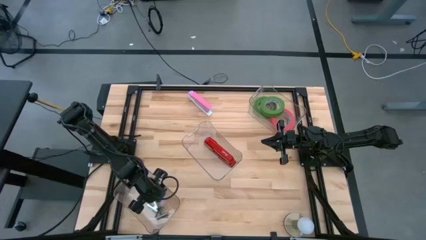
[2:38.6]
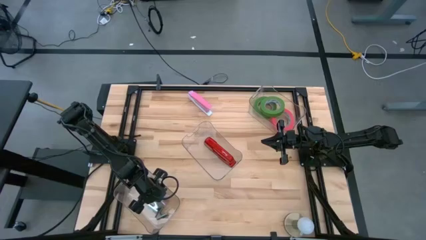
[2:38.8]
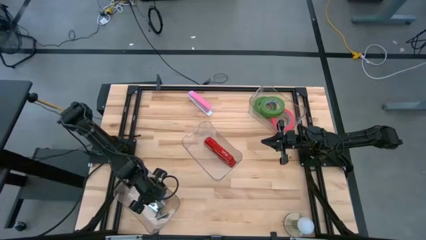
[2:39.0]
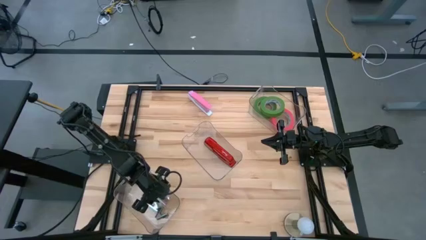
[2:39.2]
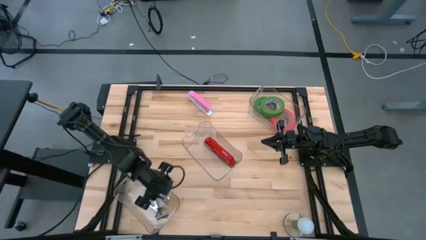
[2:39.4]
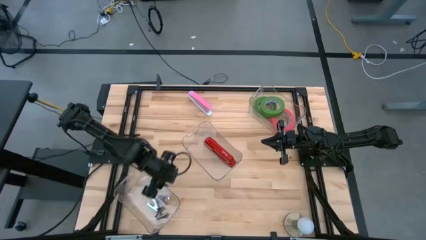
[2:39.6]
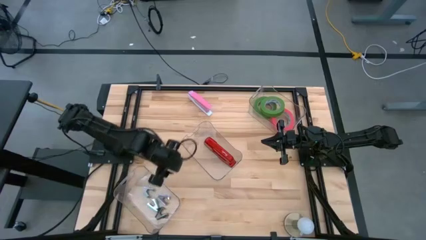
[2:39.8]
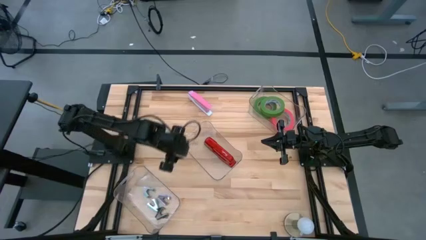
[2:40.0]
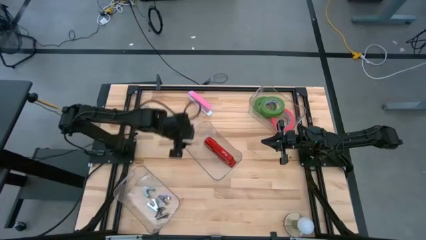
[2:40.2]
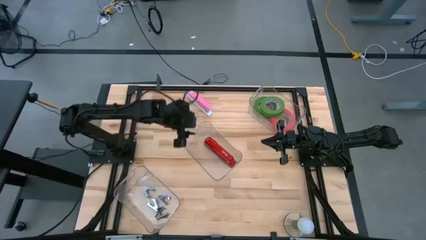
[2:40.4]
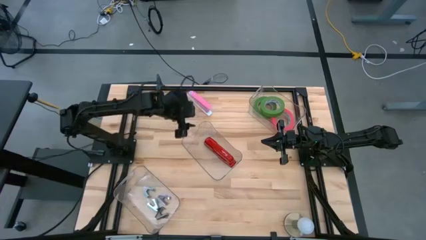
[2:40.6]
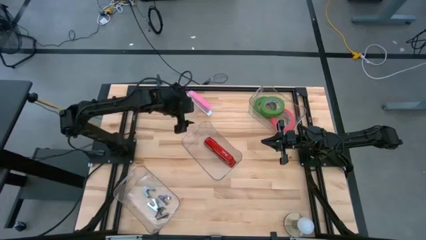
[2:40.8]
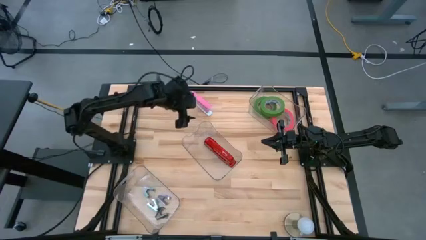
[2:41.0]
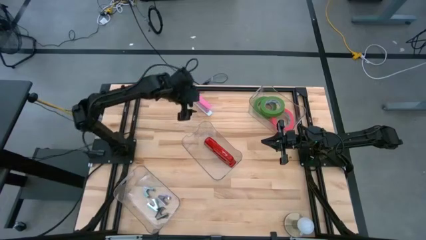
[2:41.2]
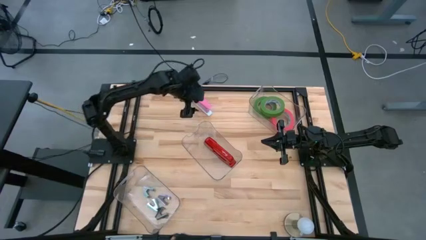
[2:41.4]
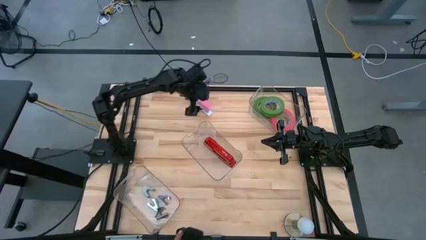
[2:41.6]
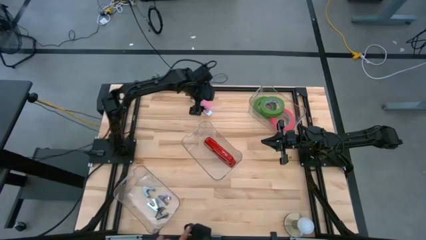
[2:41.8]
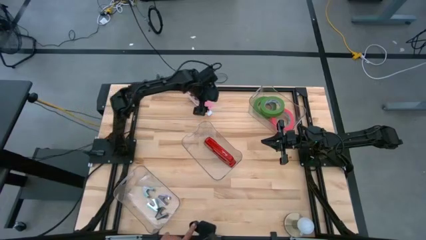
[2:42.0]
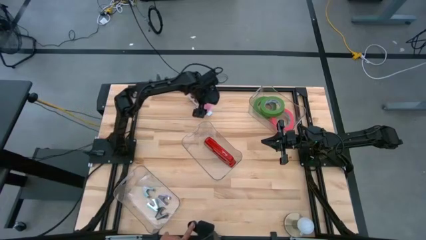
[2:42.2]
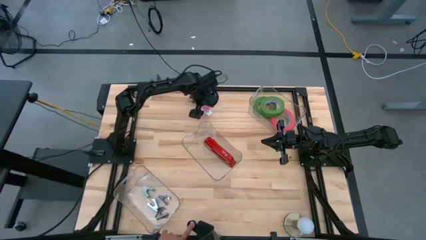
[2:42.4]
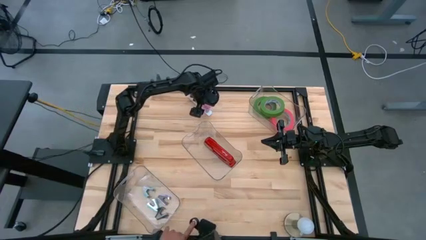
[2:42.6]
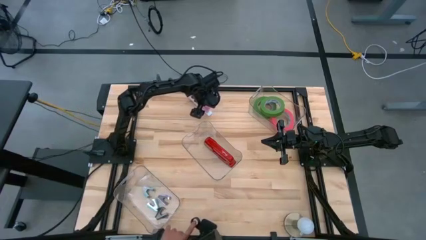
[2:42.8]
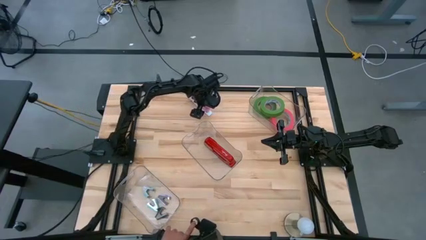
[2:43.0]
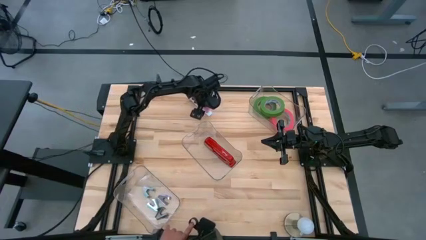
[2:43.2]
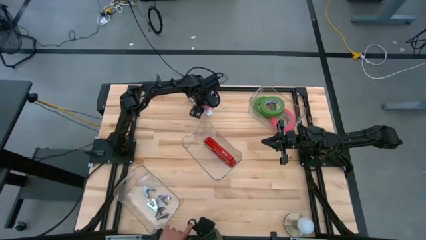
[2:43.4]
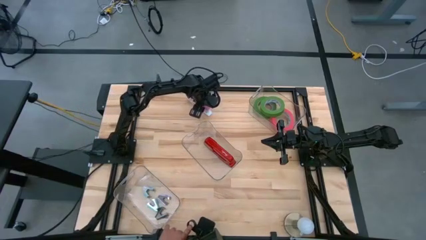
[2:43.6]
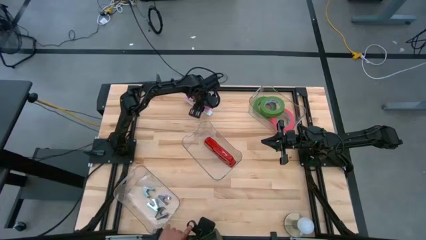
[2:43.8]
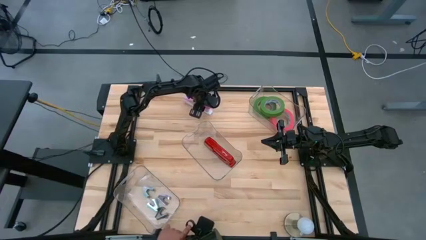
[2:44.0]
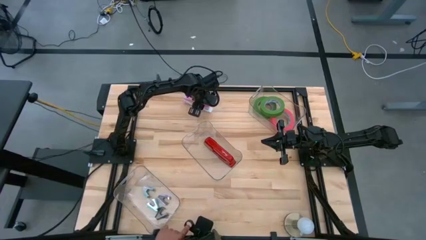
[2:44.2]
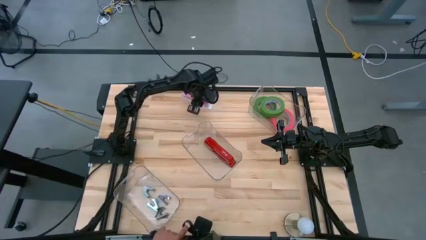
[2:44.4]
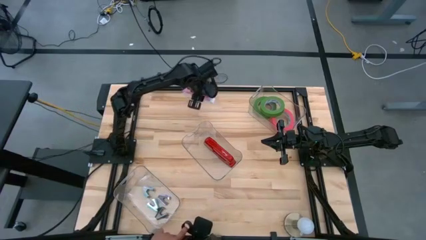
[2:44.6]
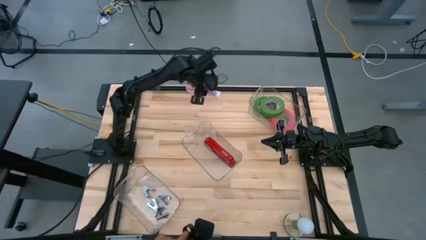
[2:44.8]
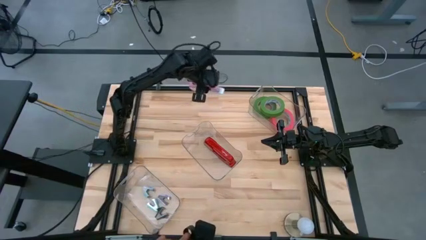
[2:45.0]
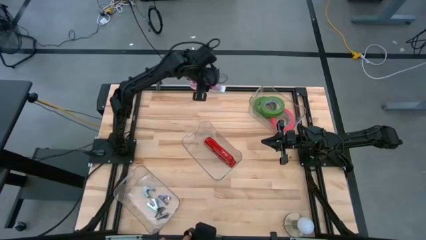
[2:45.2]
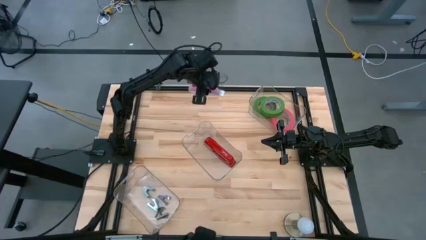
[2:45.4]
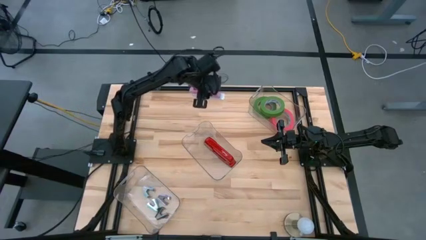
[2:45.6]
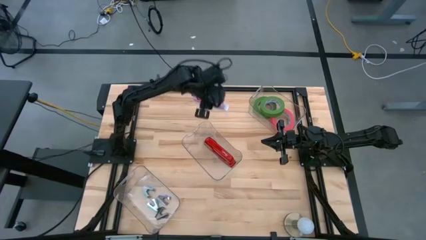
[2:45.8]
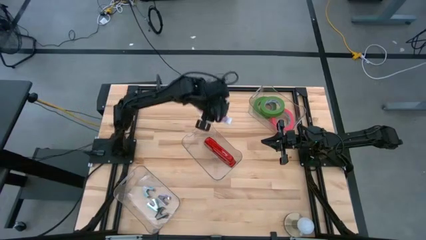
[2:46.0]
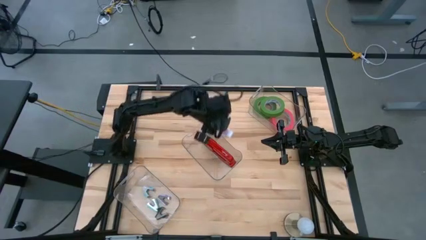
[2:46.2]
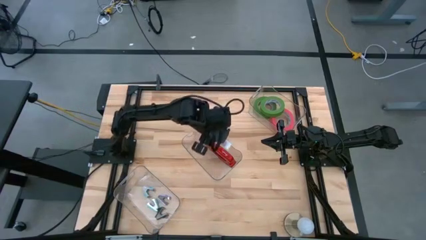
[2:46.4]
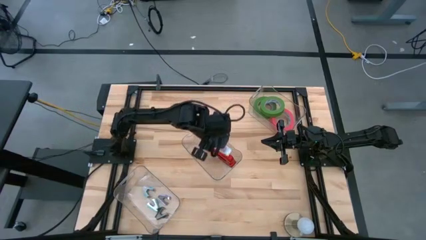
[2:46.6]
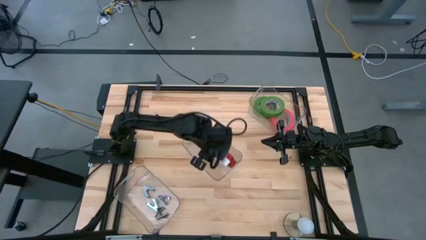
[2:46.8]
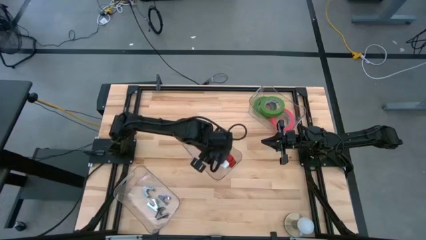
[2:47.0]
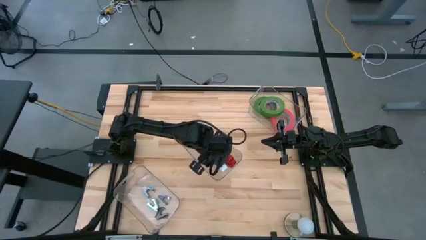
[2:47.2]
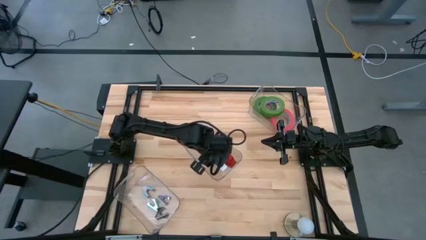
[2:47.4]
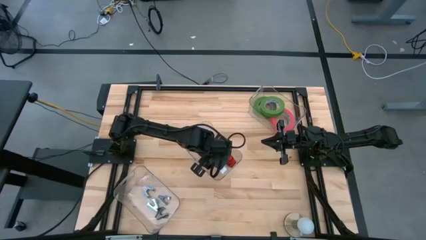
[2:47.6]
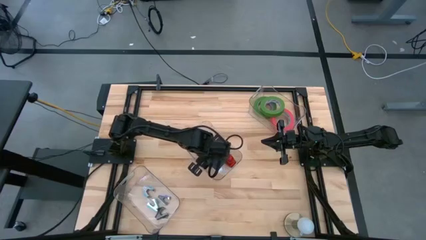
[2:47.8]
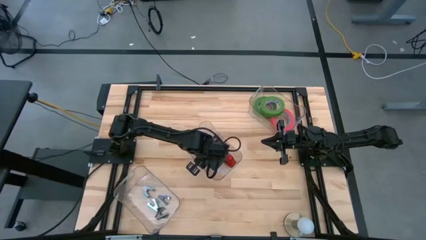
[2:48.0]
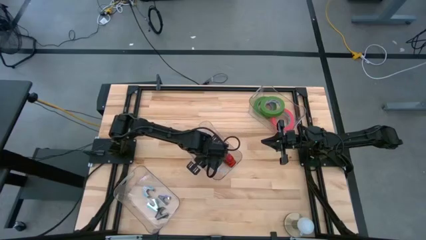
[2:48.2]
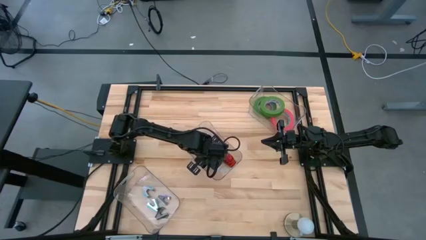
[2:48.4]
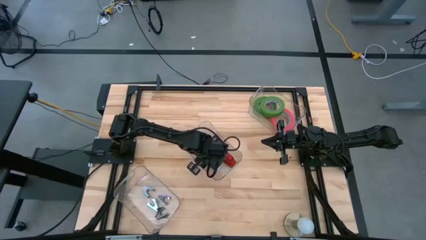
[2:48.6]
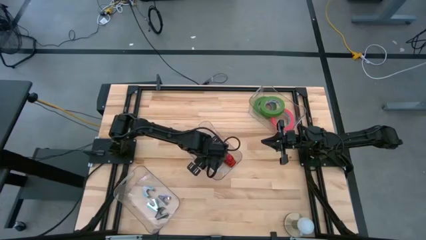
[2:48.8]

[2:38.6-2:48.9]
Task: Pick and place Stapler, Stapler remover, tape
Put the pink stapler into the middle transparent bin

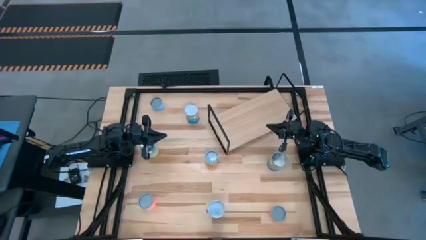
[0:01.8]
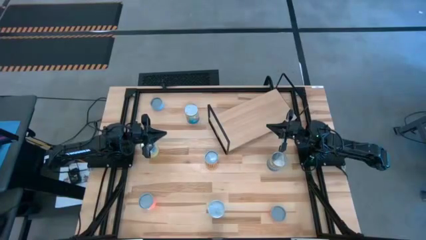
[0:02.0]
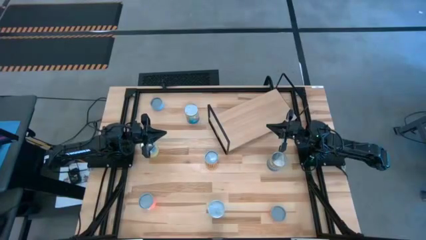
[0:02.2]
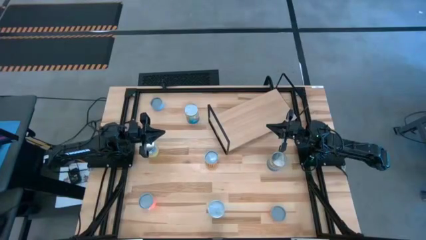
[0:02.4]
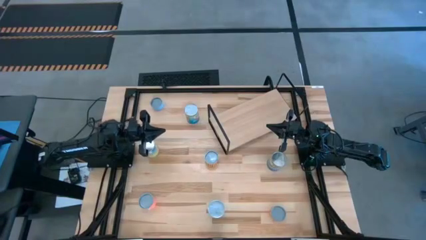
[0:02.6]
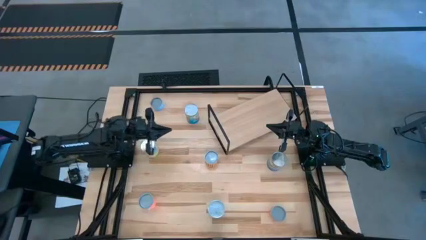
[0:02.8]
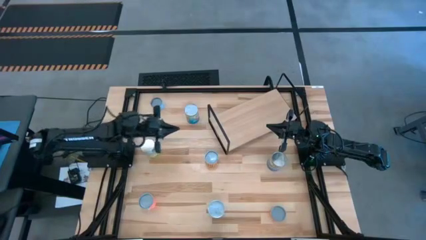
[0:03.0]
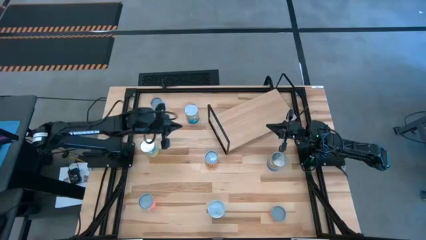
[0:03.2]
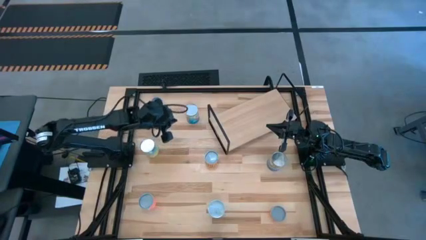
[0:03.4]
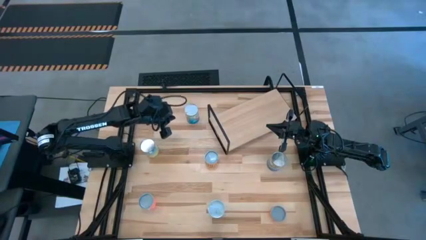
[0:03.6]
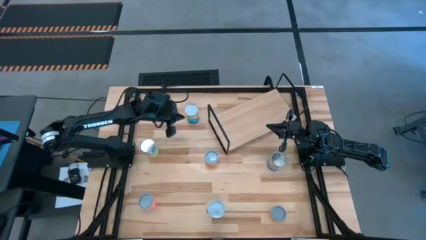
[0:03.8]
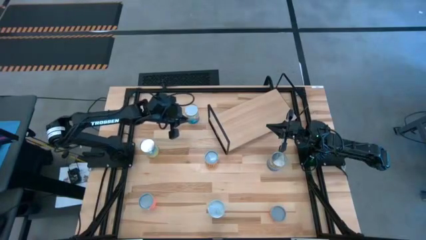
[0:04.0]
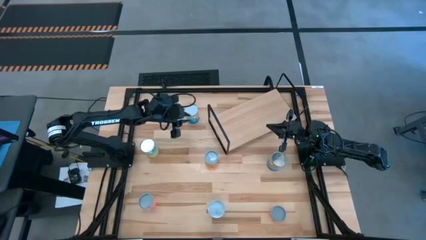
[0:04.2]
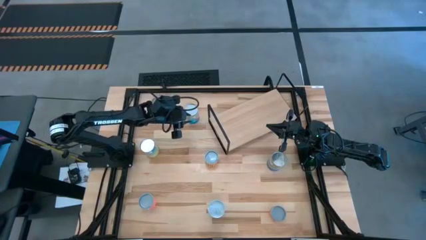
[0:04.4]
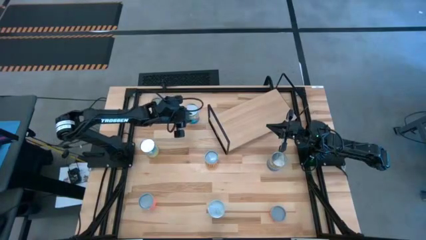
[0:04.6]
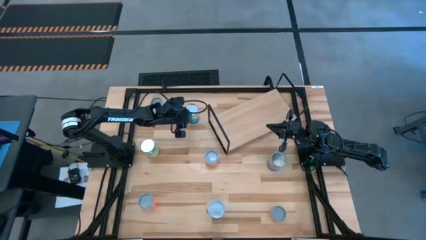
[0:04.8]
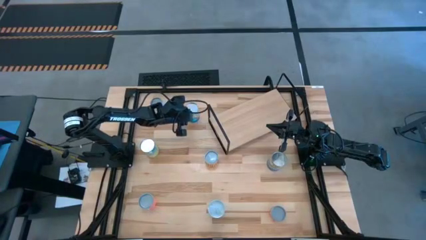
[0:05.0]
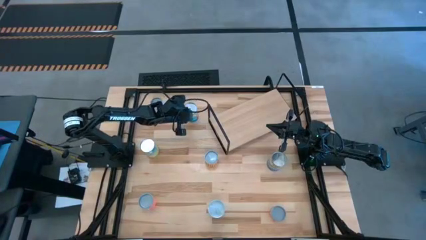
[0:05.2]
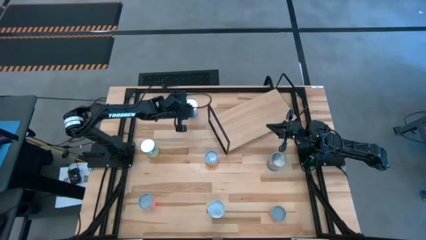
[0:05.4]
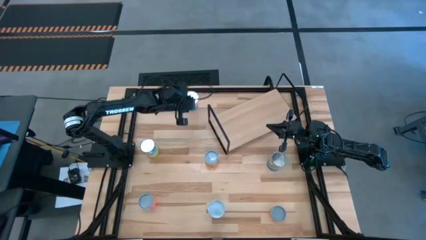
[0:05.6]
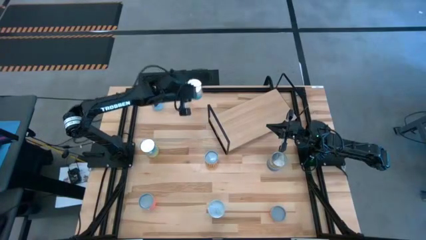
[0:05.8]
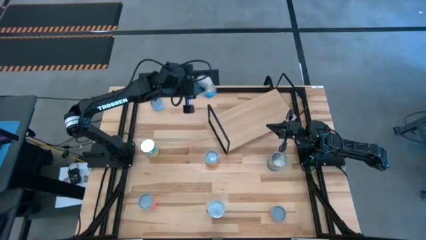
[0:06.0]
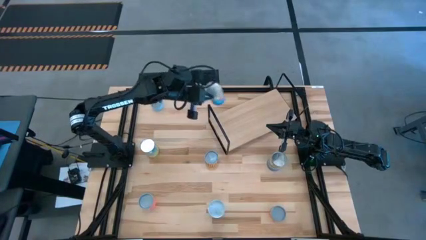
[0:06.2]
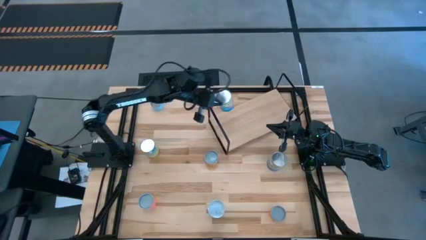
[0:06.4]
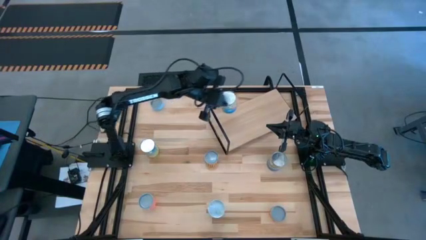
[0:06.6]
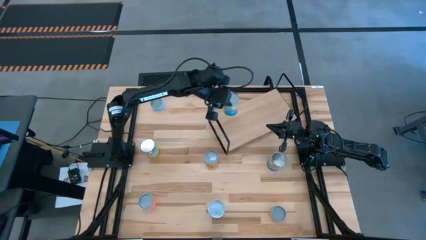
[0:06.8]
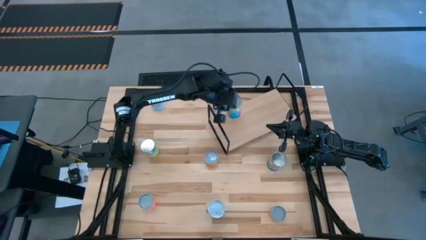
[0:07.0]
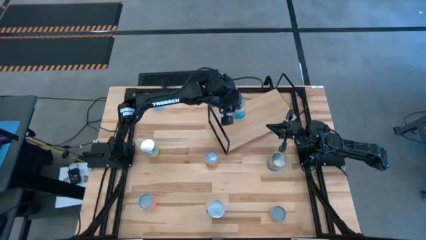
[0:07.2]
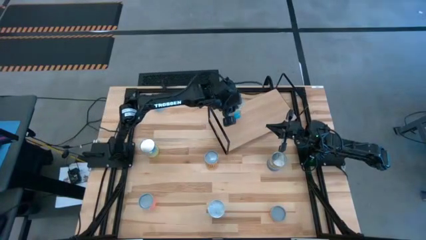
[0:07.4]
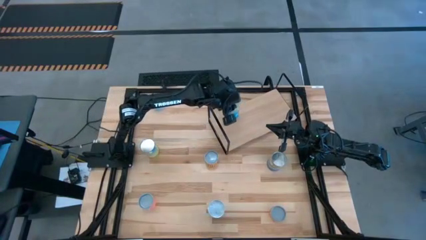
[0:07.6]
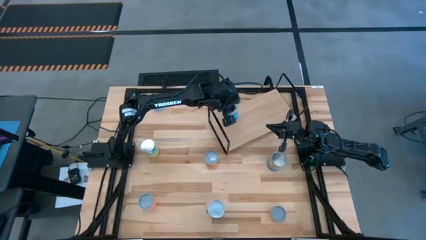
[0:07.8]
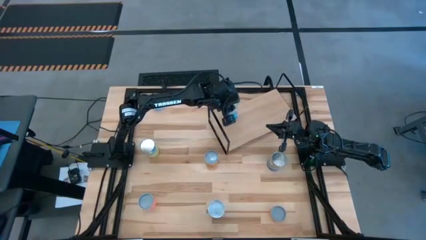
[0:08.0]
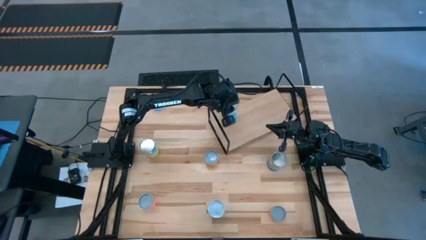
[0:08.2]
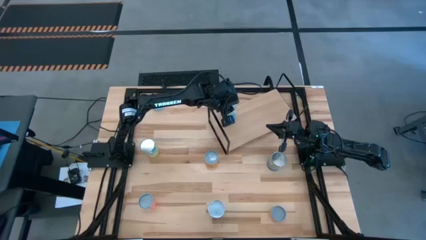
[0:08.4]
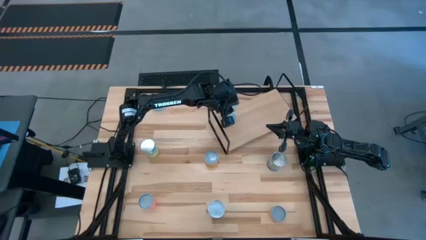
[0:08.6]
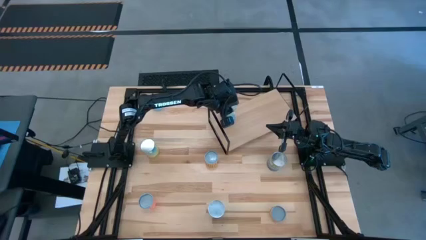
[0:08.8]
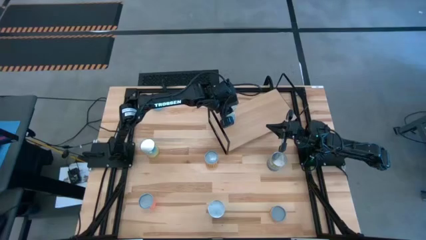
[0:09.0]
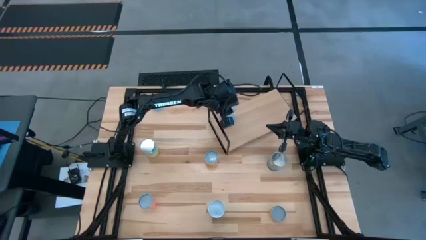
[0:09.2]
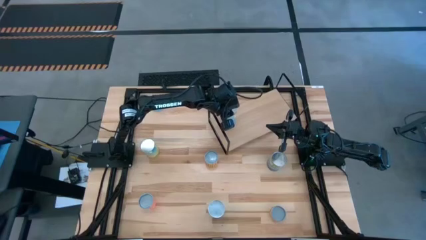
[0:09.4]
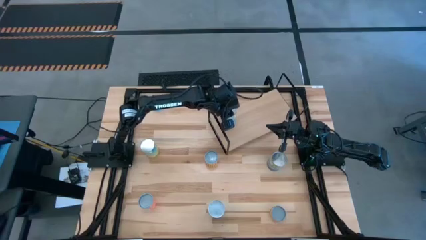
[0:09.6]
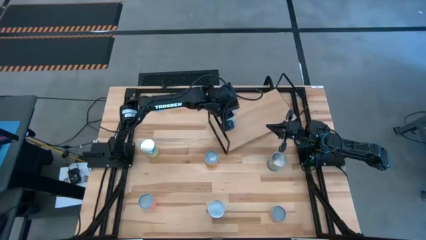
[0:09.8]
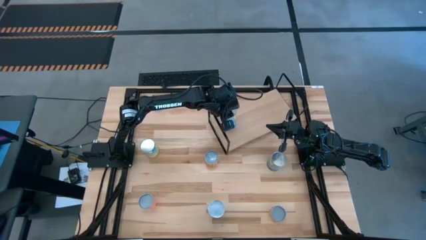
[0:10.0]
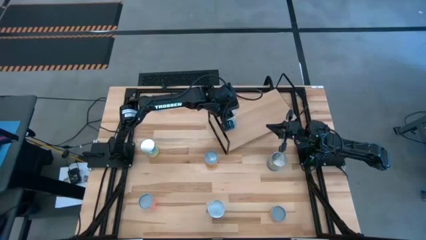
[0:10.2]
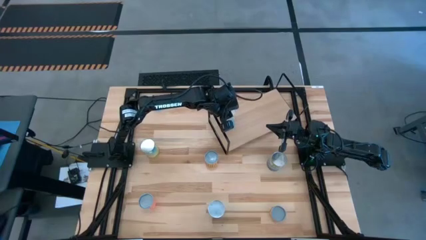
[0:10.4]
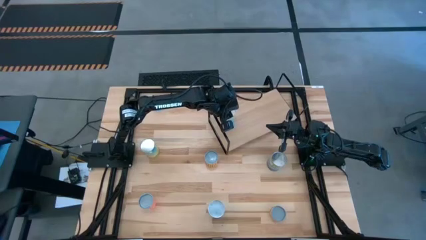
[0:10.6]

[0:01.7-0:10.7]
Task: Pick and place cans onto a shelf
Put the top canned tomatoes onto the shelf
